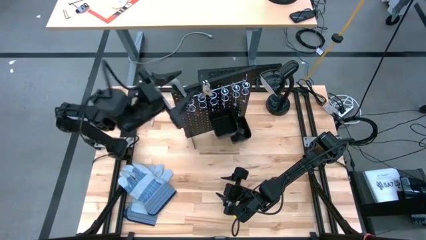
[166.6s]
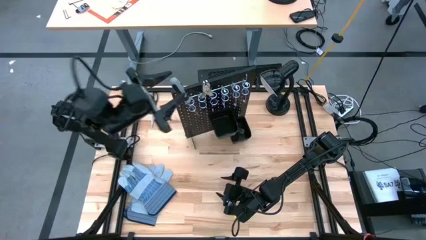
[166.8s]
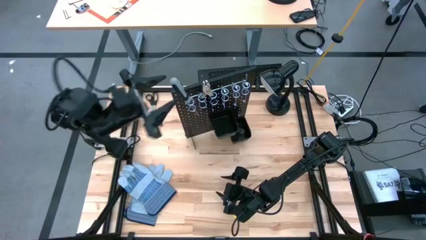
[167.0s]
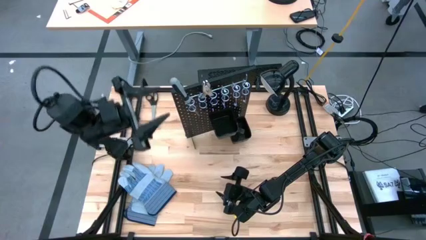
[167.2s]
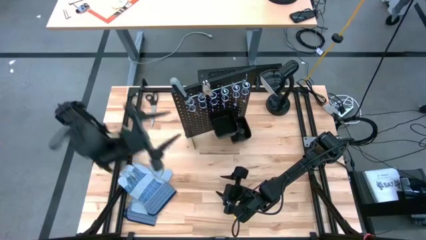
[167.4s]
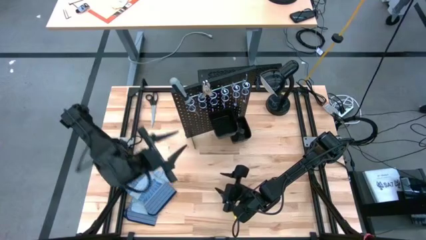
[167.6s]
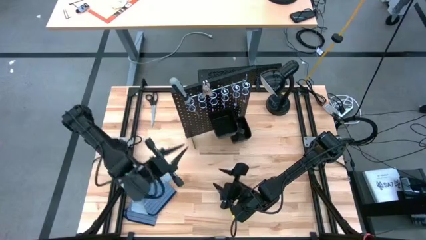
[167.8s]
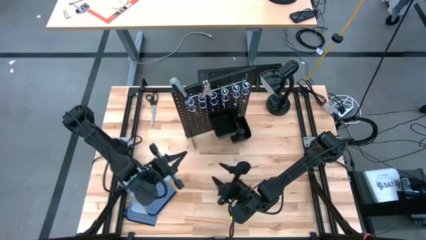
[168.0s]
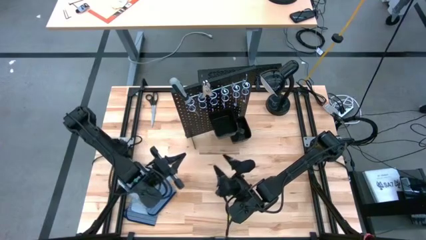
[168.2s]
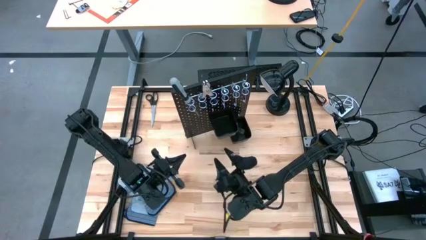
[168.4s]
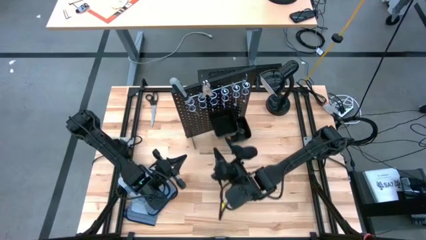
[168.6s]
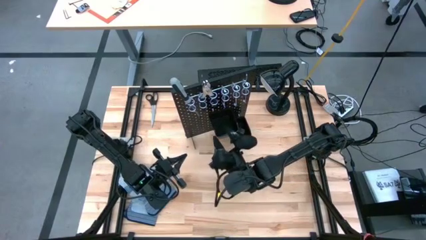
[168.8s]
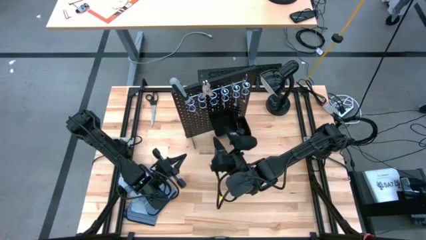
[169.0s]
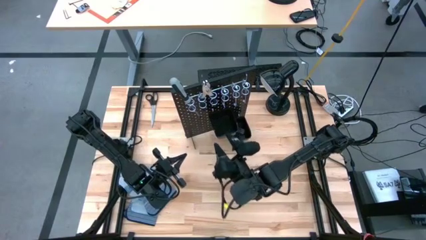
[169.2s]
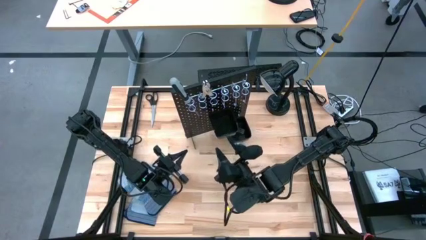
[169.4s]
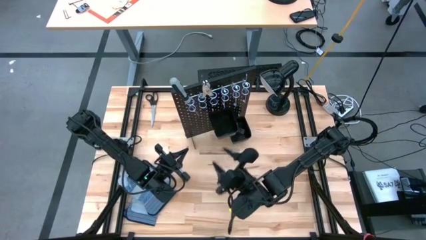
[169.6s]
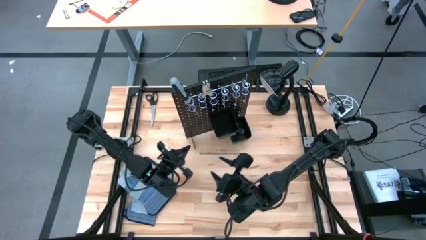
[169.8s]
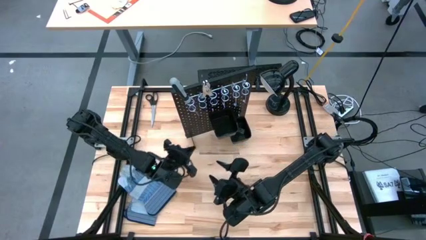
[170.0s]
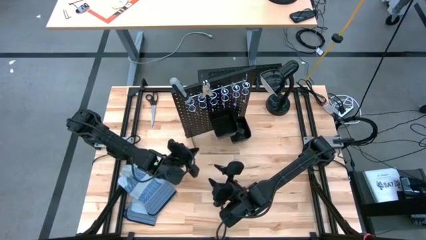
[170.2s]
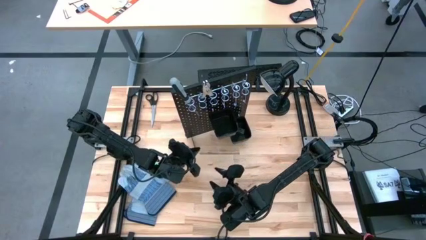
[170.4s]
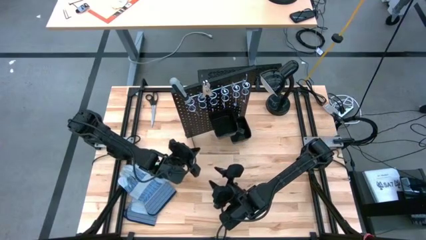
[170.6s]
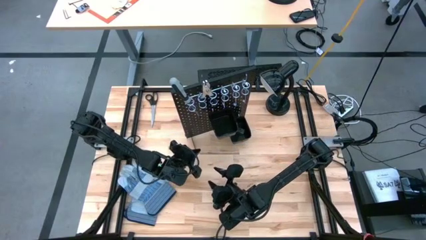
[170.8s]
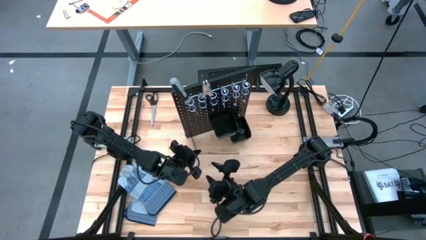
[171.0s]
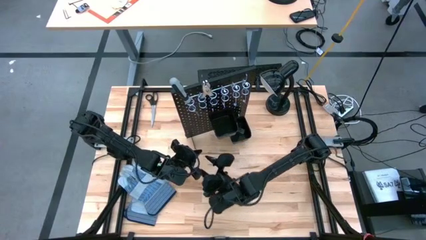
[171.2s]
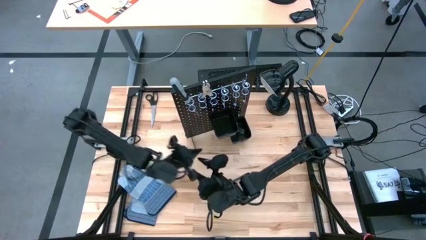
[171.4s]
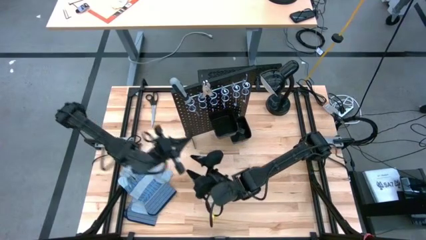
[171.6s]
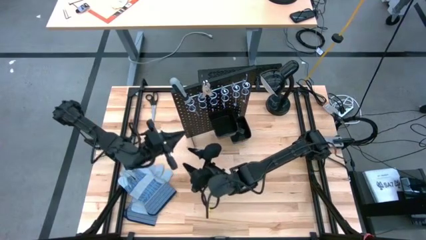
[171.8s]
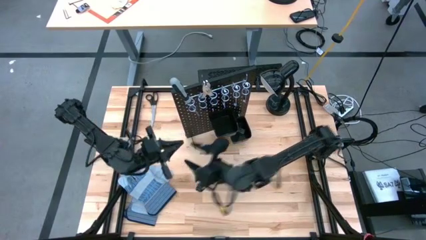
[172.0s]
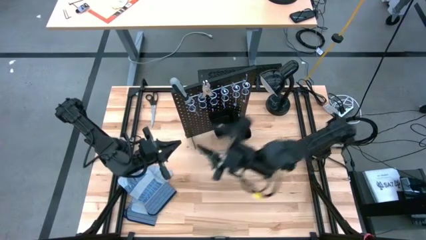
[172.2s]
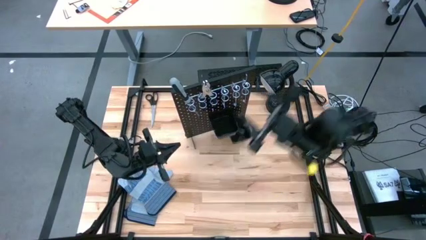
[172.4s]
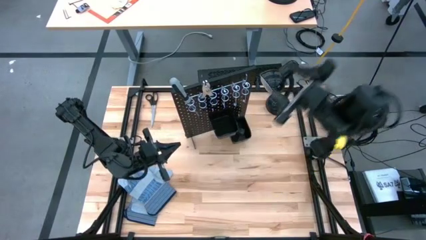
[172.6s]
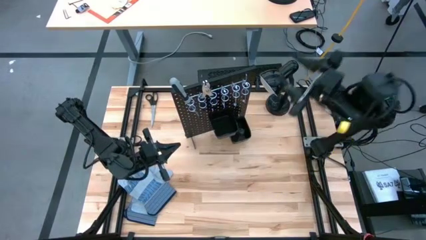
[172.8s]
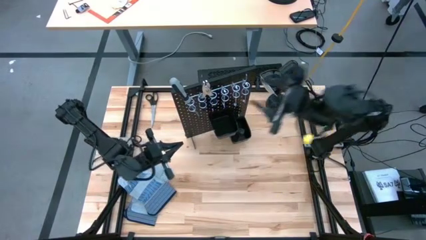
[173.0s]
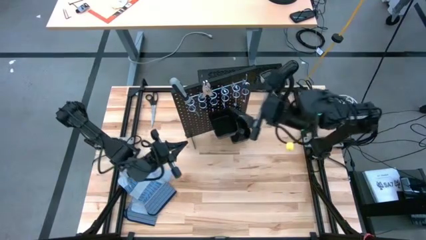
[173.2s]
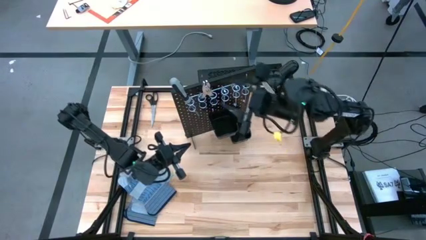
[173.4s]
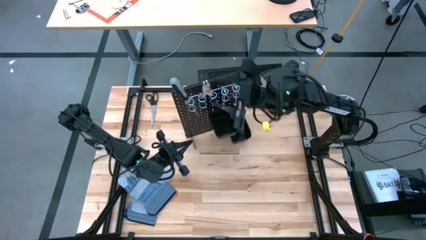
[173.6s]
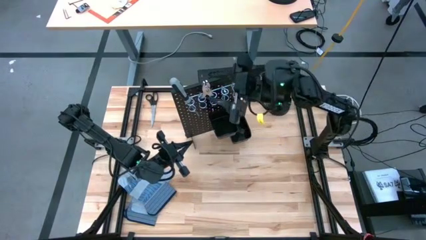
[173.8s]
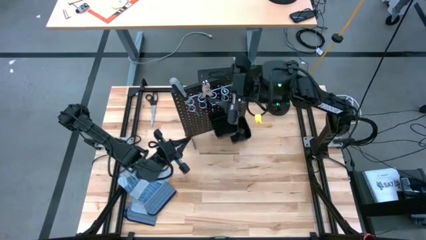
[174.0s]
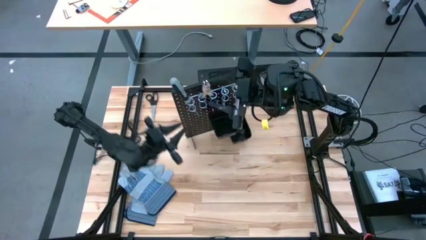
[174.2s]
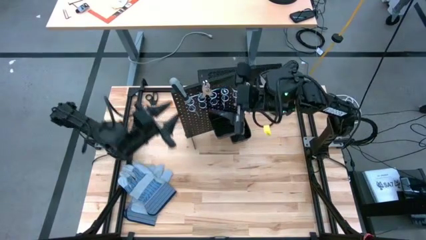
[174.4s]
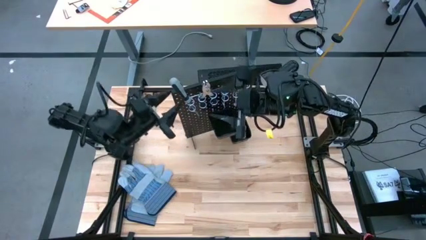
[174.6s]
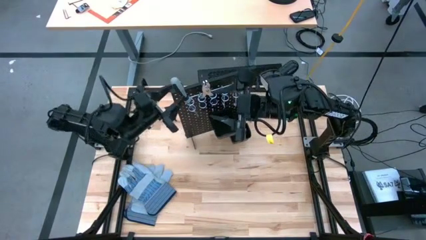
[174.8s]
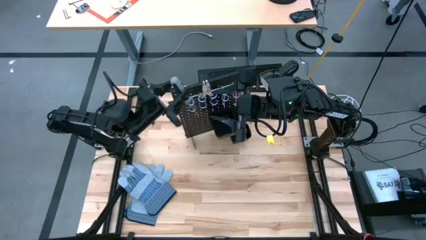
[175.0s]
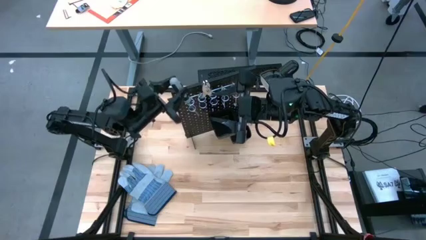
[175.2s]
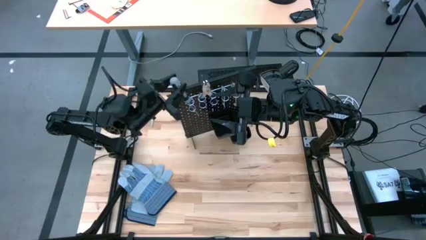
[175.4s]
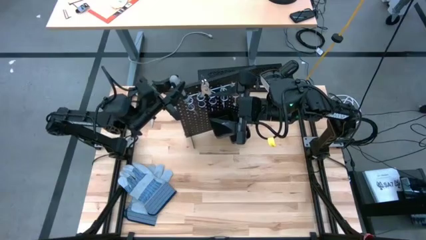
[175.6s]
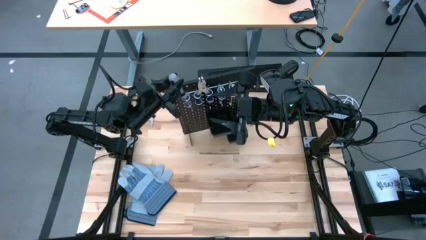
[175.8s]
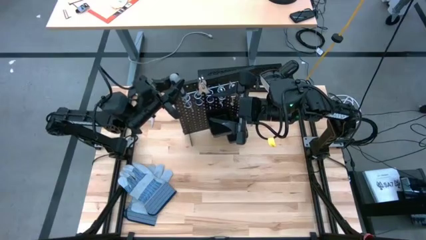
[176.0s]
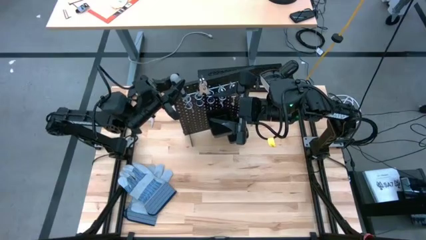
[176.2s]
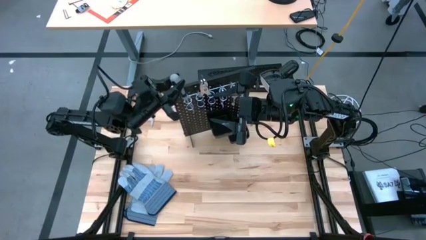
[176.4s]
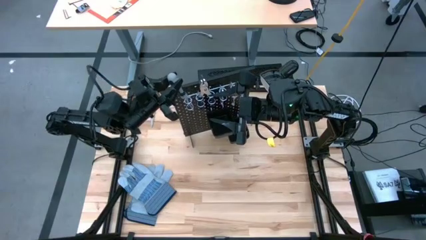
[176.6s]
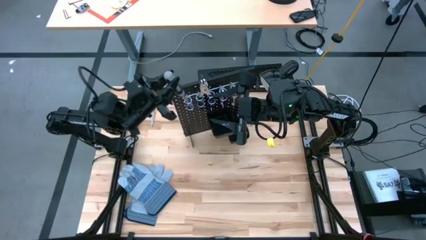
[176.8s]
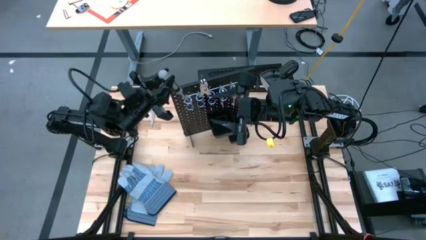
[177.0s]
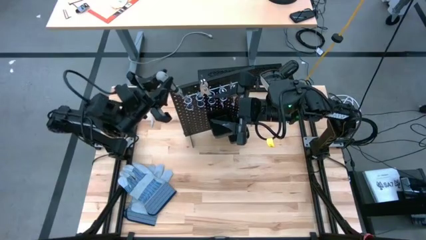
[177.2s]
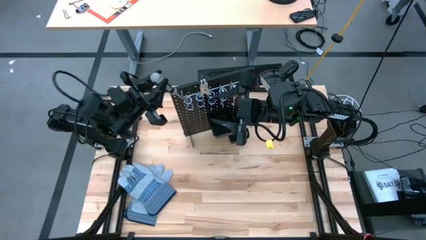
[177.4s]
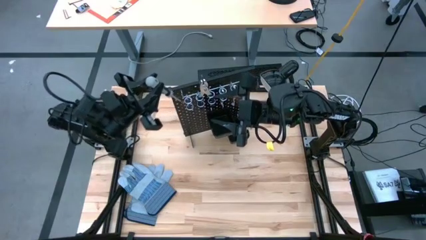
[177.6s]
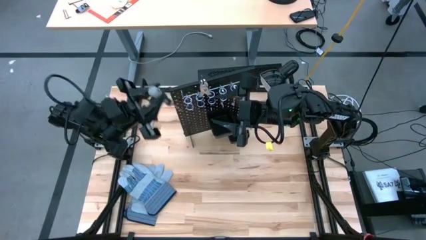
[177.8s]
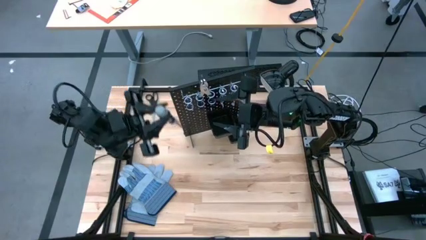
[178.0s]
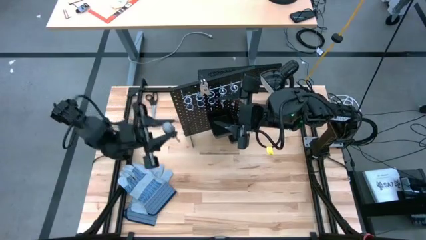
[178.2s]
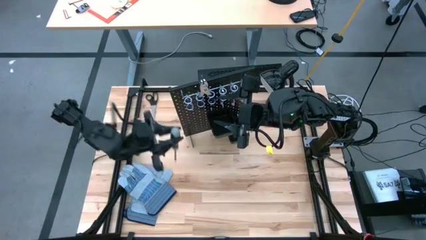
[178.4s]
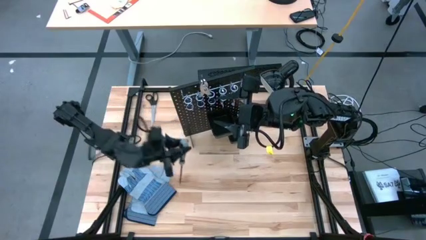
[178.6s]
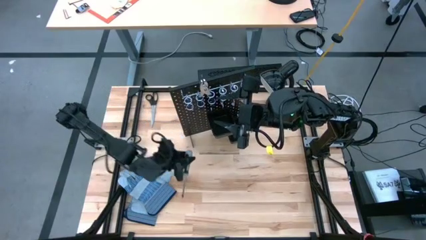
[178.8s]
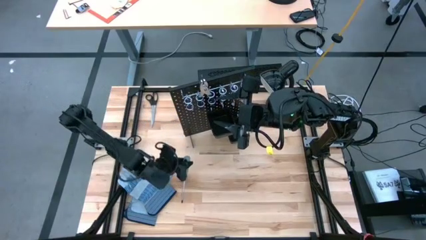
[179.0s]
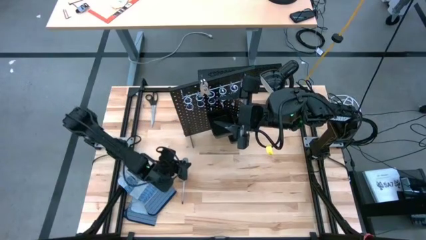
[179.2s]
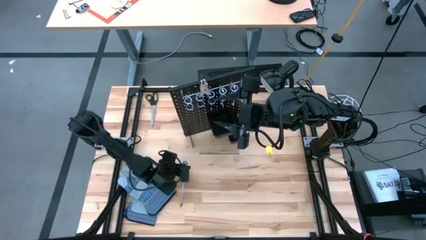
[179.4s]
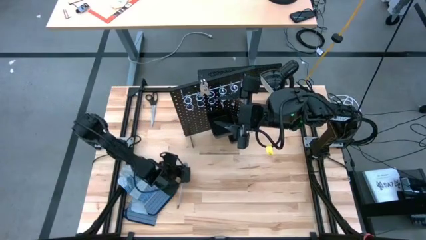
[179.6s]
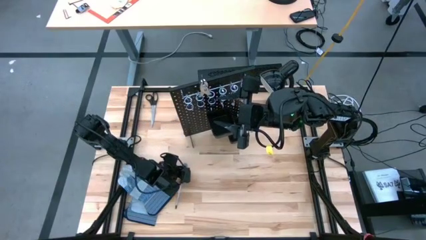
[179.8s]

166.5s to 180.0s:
Task: Hang tools onto peg board
Remove the gray screwdriver from the black pegboard

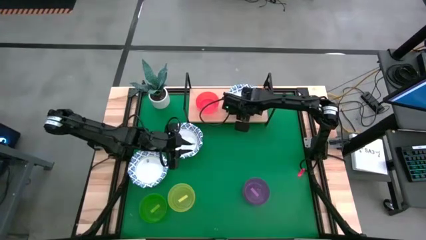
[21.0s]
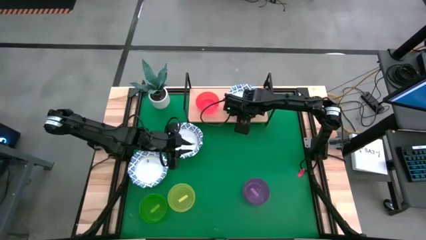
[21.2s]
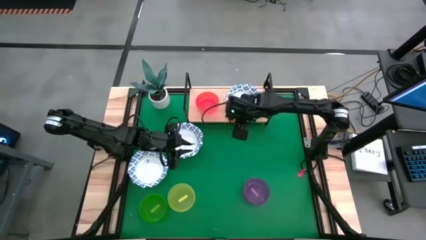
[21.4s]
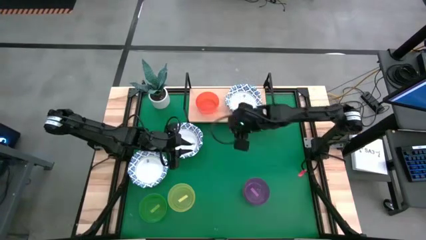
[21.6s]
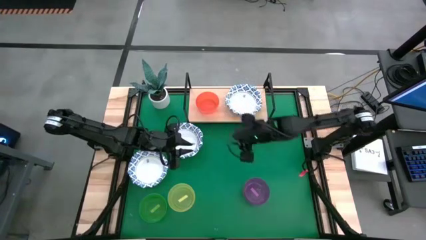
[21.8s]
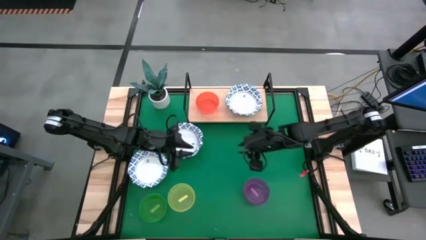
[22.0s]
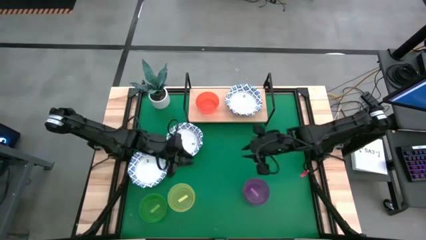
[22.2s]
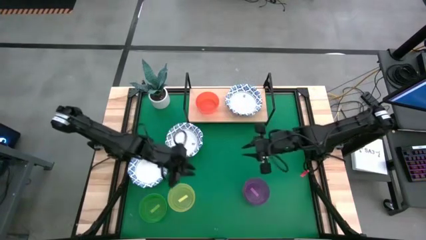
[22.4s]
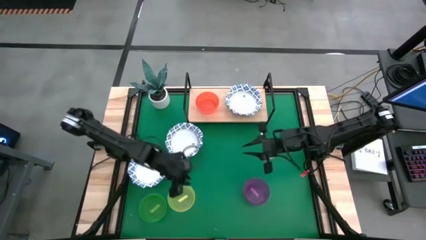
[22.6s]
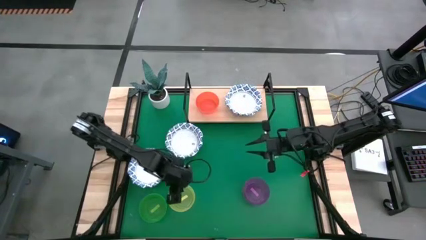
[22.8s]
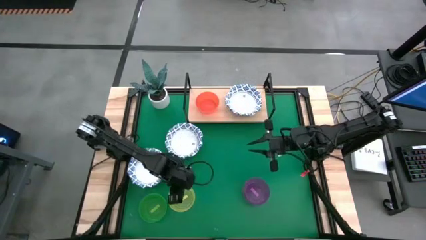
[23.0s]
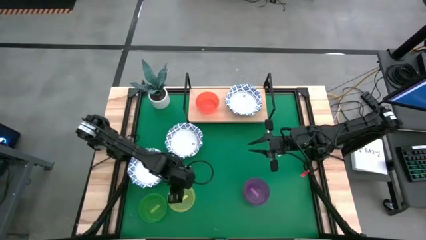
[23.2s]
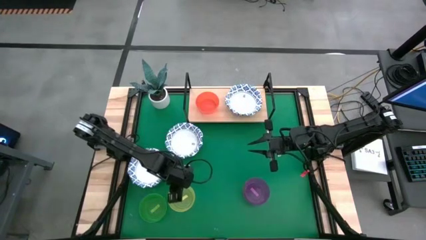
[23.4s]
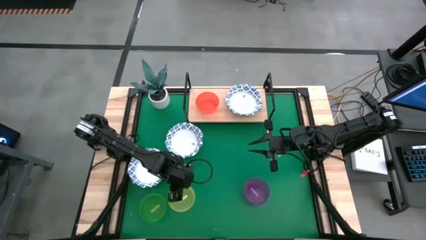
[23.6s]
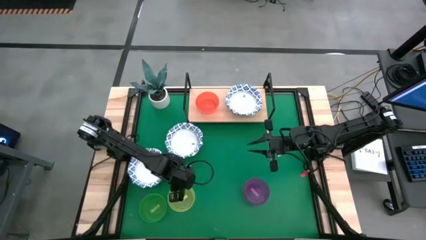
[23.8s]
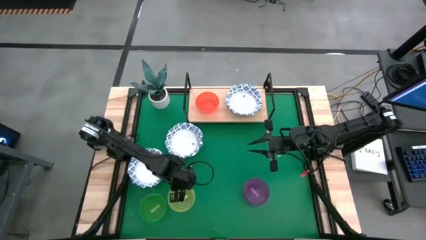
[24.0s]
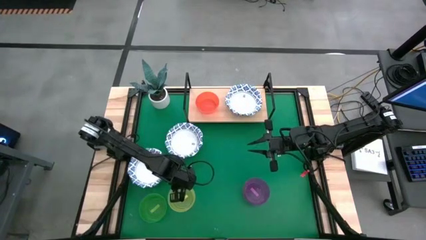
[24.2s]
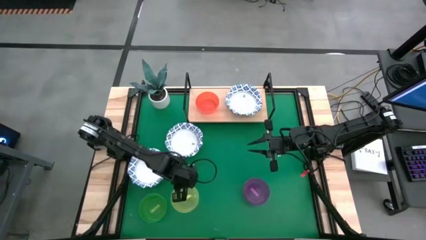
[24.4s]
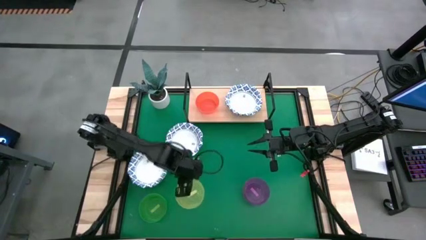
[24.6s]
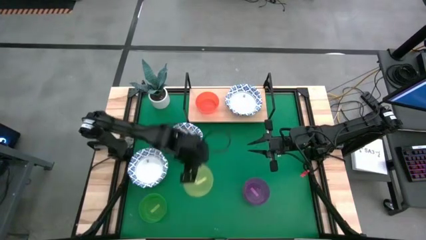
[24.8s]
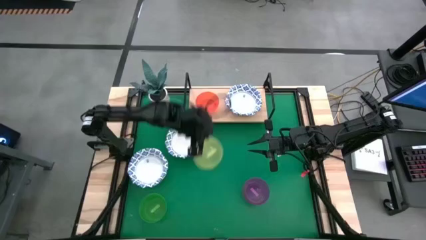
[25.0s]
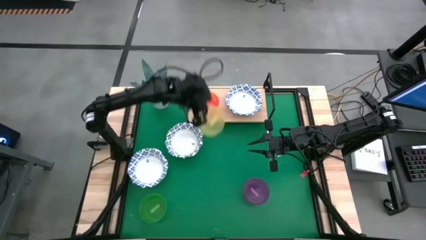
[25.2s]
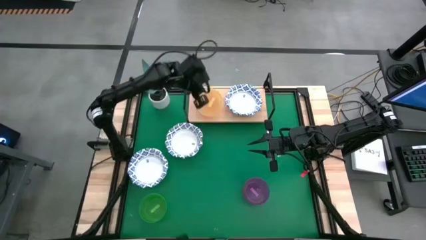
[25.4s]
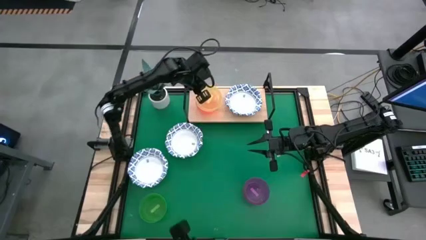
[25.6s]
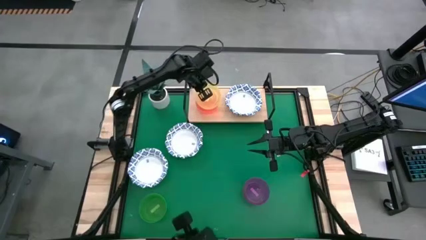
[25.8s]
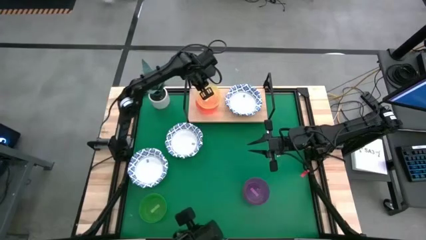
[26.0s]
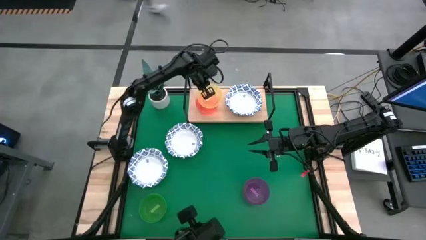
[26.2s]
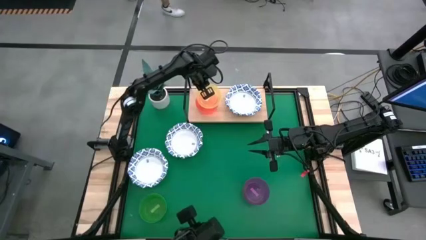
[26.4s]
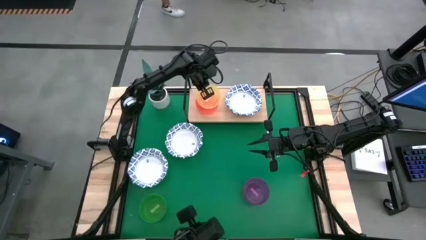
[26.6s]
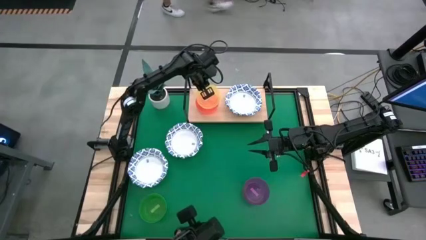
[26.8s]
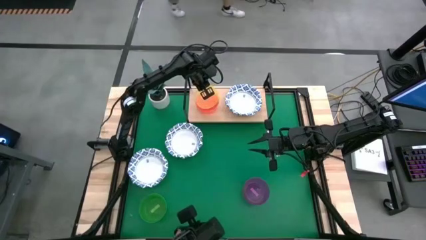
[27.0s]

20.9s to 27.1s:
Task: Place and stack bowls onto a shelf
Stack the yellow bowl on top of the orange bowl on the shelf
